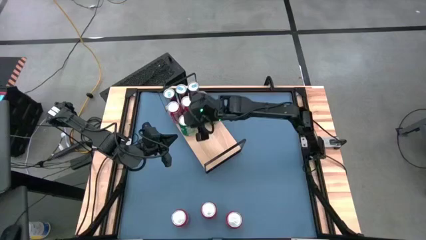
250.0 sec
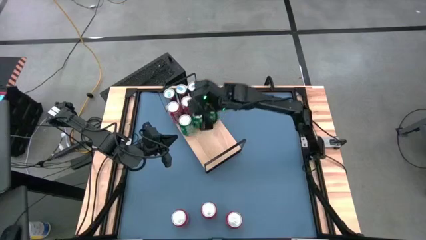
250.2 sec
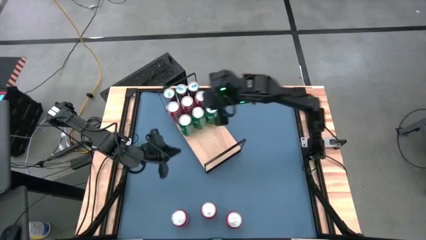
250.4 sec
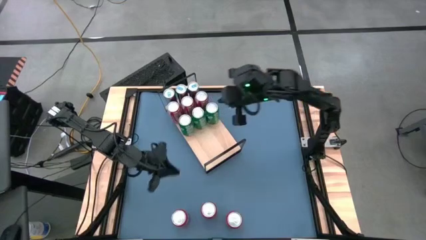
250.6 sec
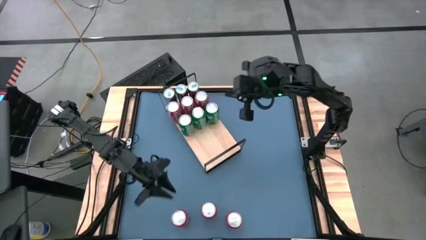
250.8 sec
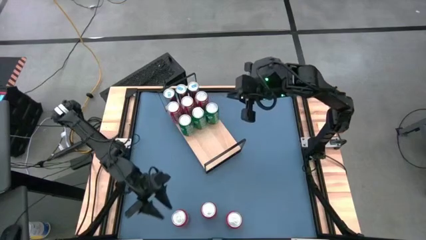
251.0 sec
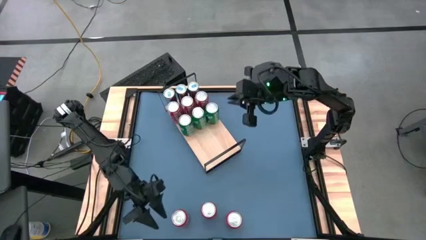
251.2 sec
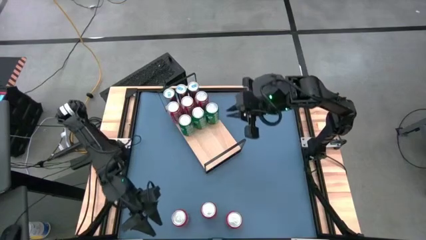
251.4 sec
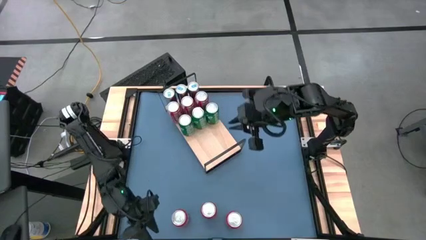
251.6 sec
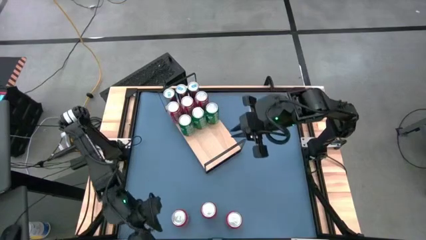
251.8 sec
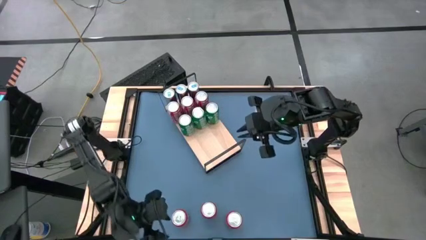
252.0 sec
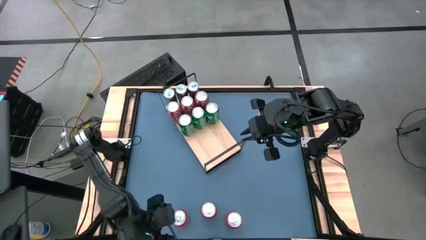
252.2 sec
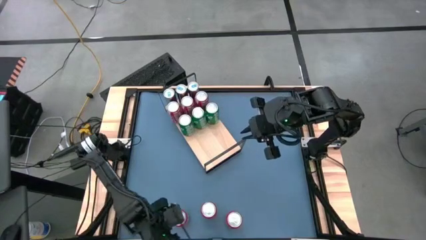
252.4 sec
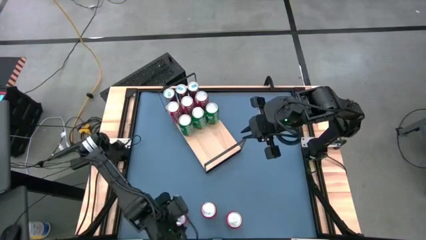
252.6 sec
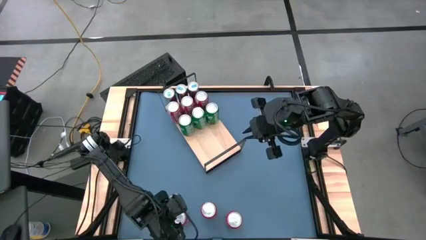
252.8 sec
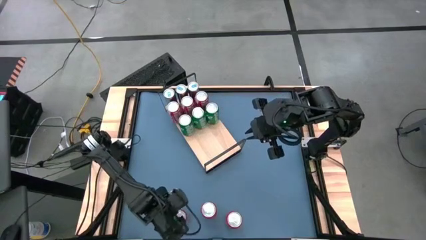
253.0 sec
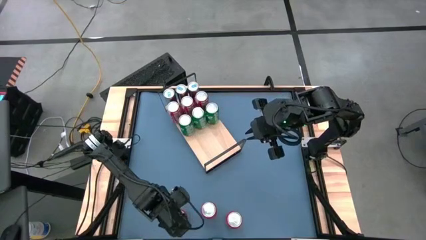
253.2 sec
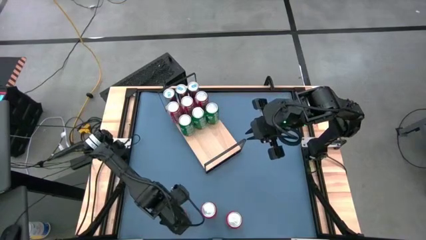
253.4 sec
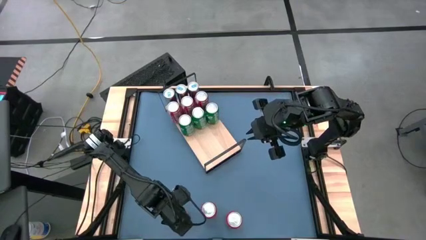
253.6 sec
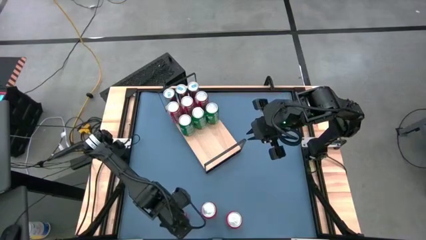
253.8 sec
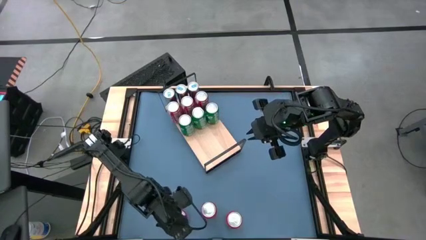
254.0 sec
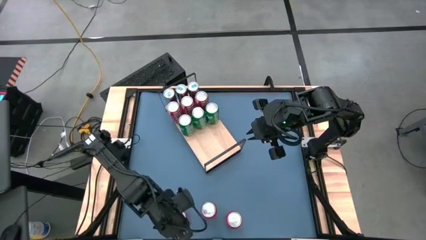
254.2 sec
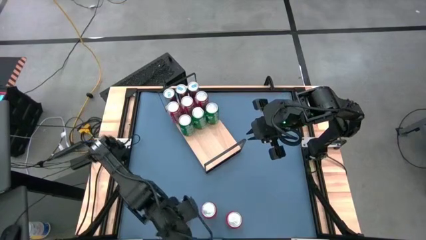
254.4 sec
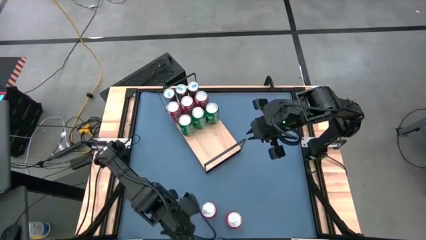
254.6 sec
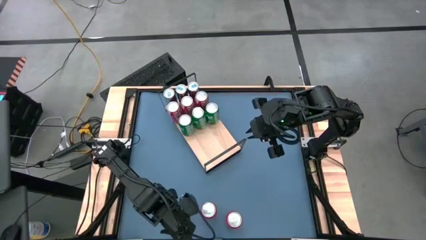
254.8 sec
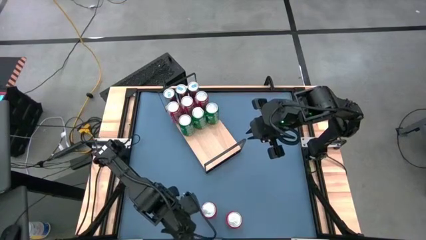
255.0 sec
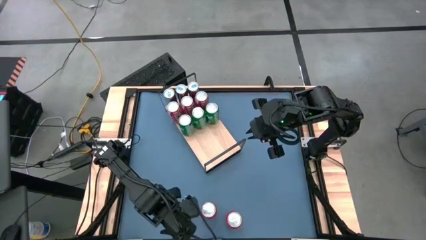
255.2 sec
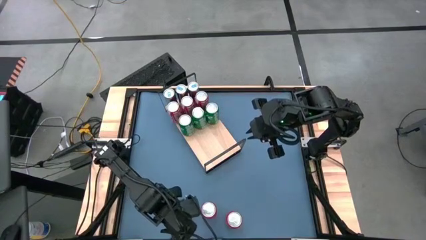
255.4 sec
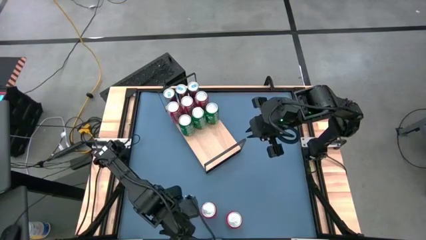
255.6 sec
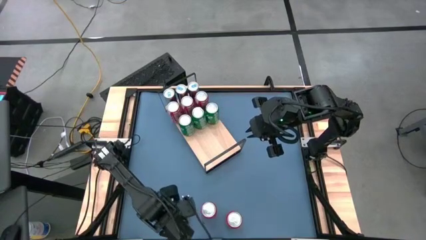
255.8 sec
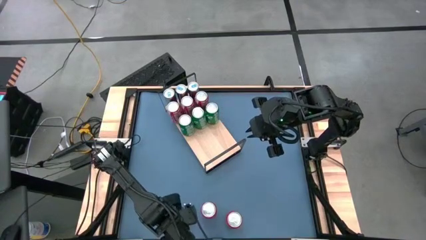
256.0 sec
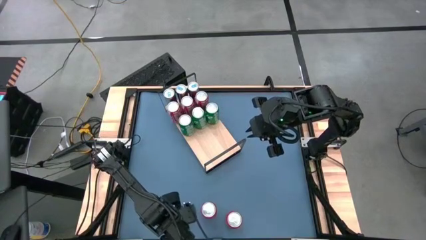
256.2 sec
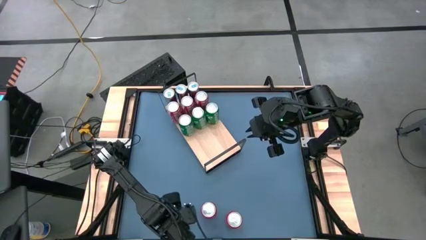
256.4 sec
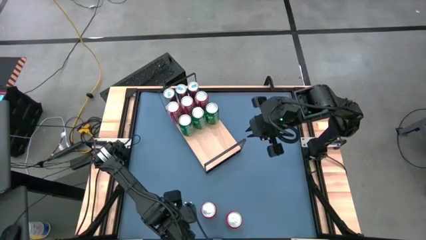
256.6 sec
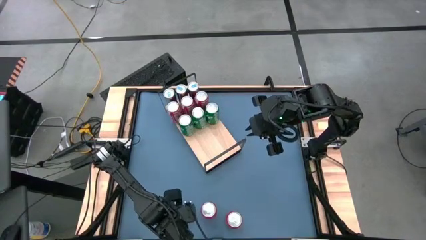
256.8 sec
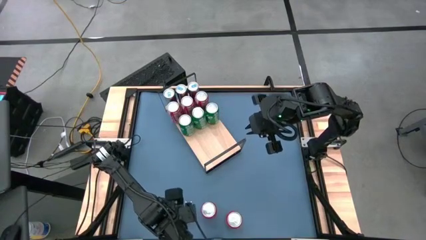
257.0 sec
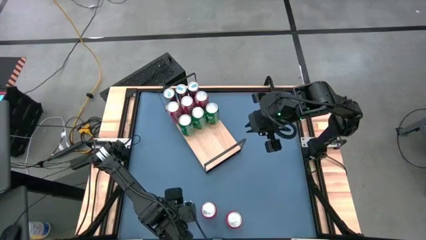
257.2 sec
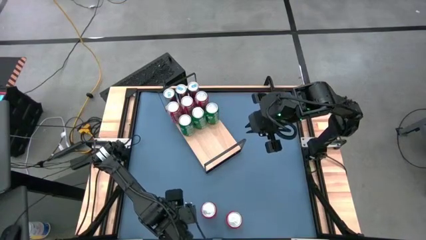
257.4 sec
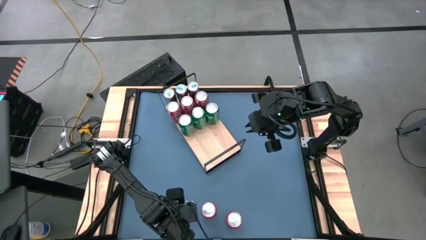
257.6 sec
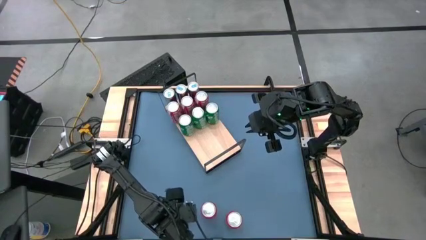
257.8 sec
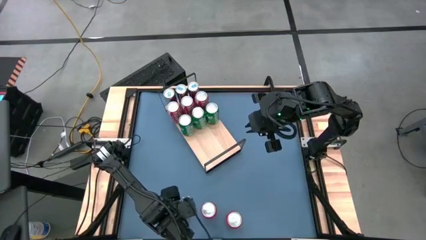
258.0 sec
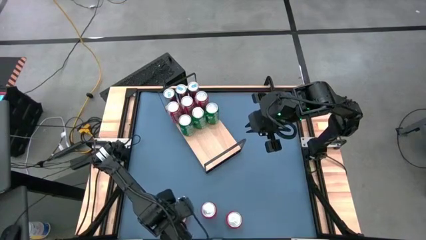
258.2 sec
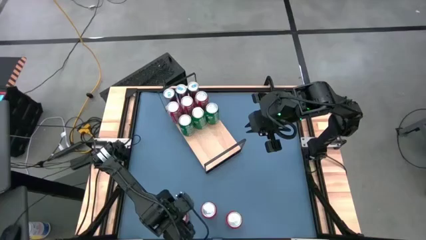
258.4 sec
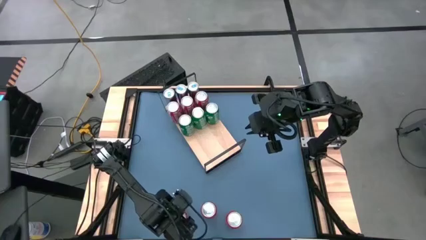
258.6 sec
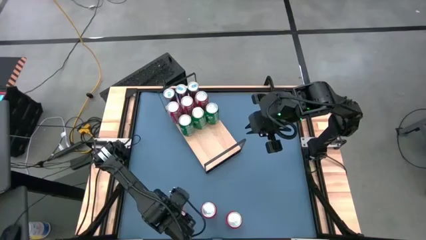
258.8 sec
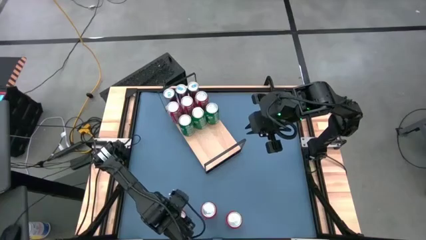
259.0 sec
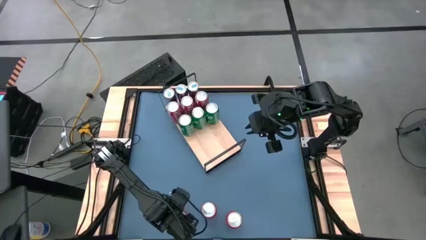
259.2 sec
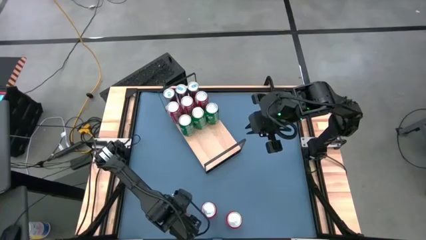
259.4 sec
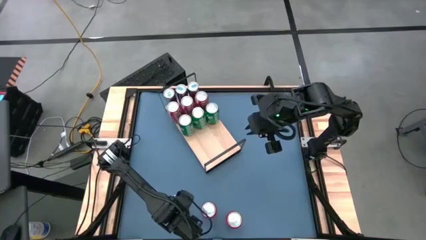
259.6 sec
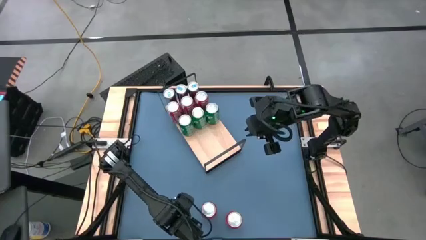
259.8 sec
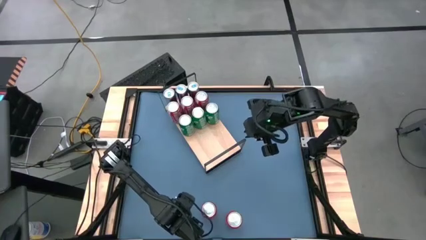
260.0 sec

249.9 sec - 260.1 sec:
Task: Place canned beverage on shelf
Put the left red soda can on the shelf

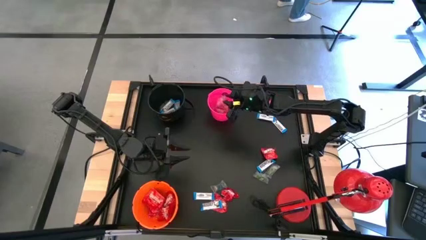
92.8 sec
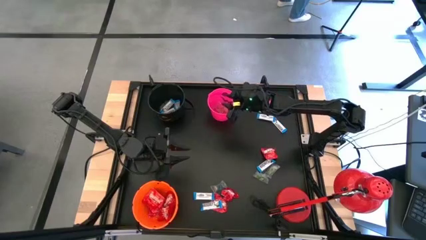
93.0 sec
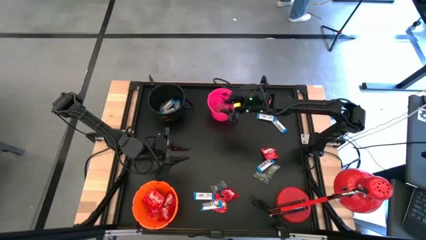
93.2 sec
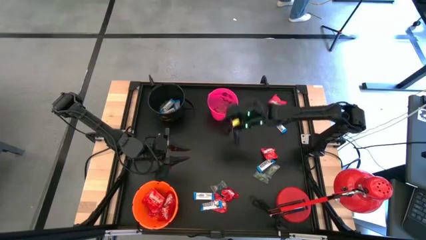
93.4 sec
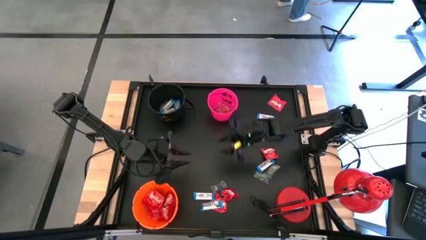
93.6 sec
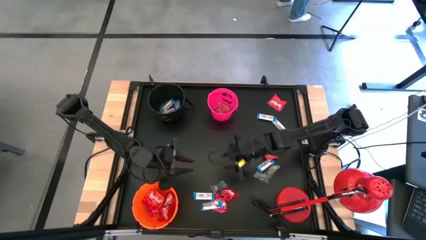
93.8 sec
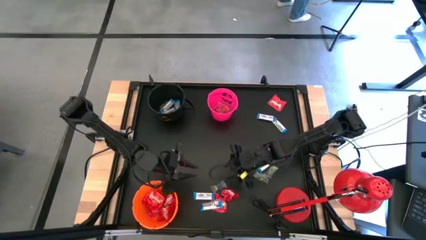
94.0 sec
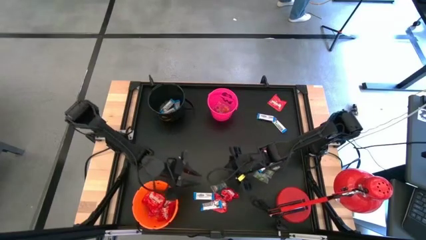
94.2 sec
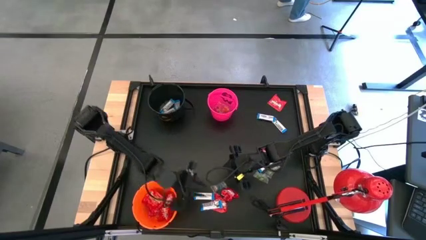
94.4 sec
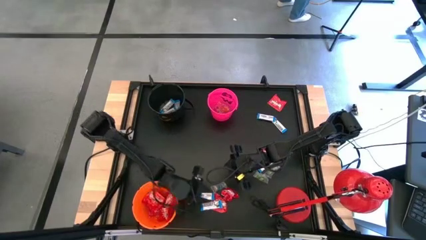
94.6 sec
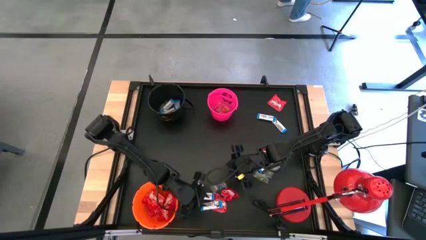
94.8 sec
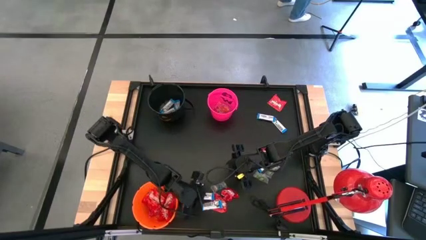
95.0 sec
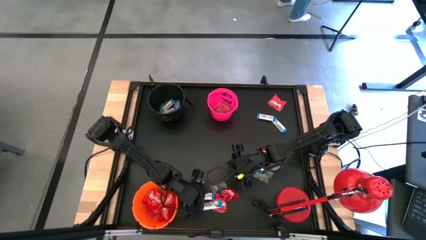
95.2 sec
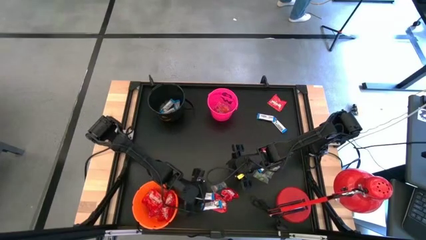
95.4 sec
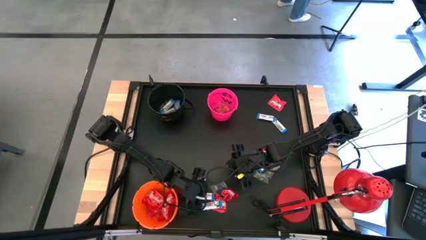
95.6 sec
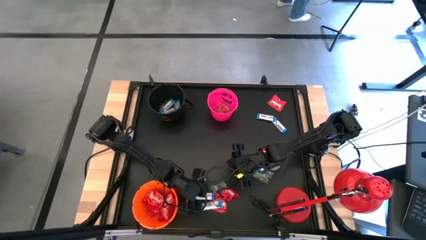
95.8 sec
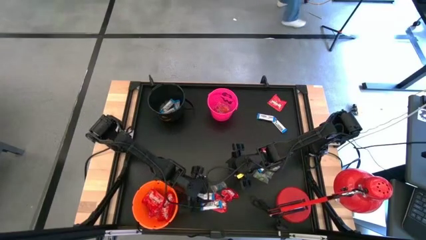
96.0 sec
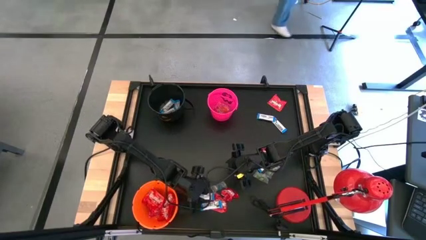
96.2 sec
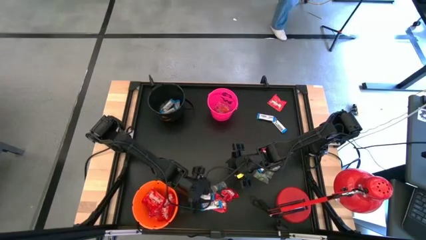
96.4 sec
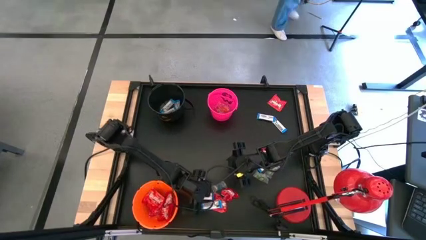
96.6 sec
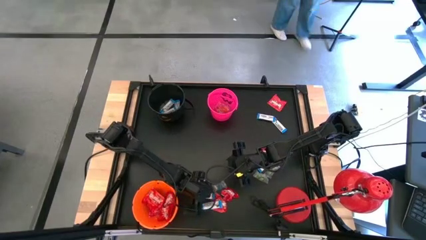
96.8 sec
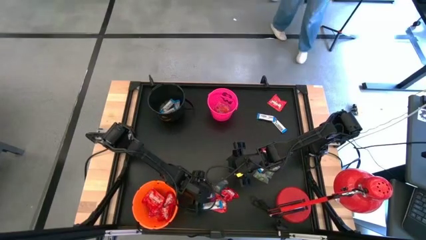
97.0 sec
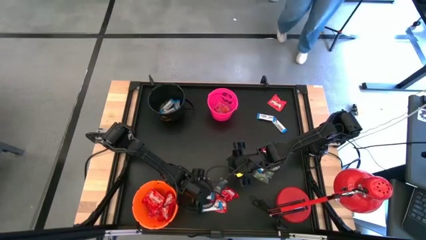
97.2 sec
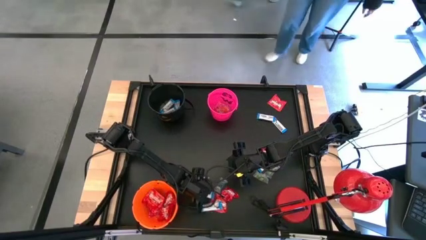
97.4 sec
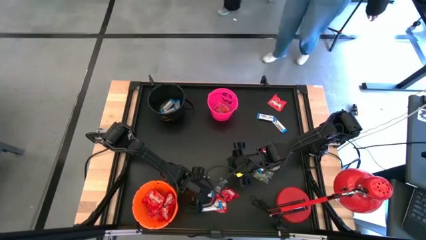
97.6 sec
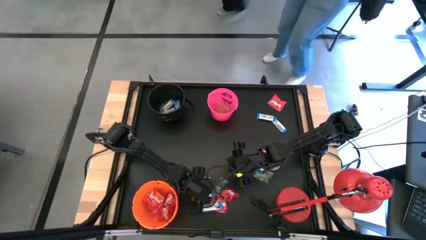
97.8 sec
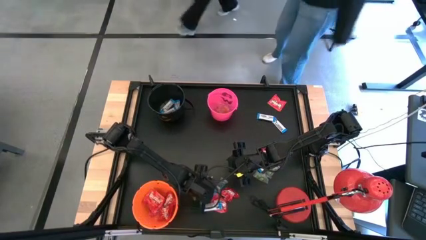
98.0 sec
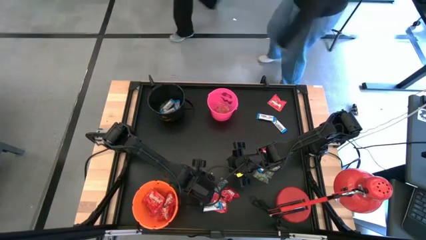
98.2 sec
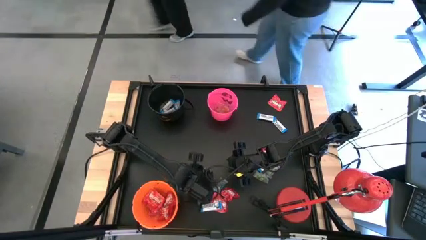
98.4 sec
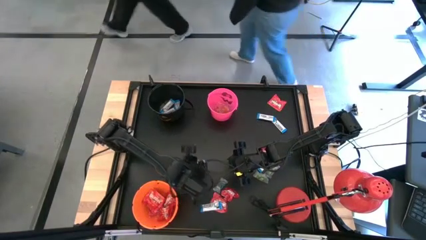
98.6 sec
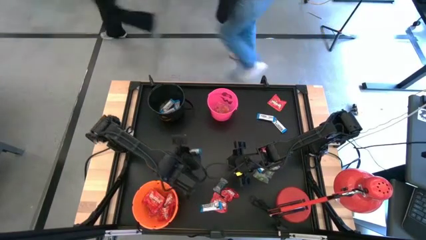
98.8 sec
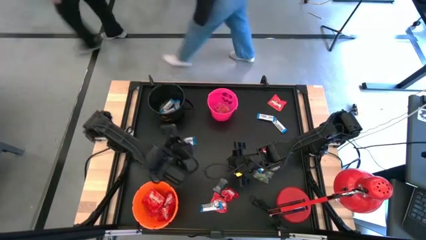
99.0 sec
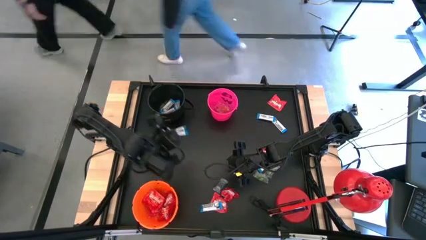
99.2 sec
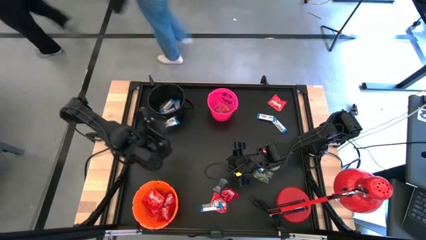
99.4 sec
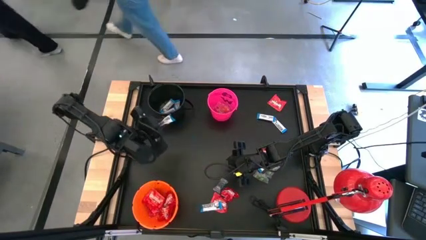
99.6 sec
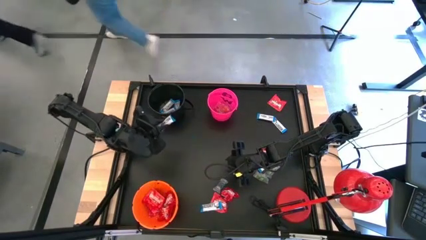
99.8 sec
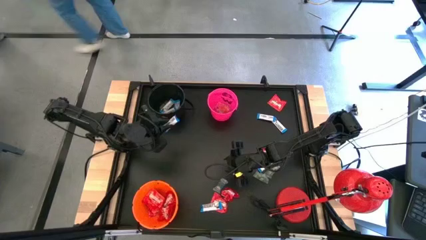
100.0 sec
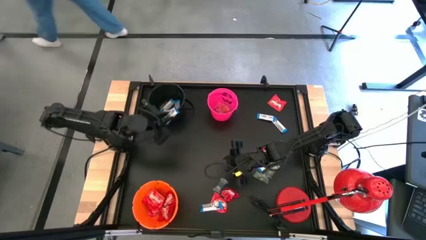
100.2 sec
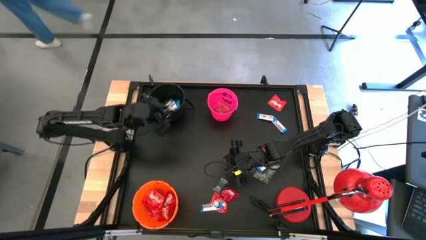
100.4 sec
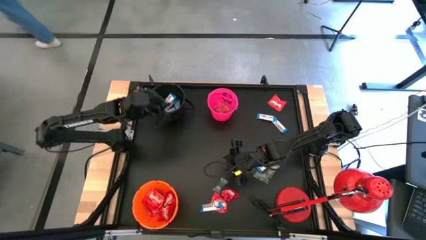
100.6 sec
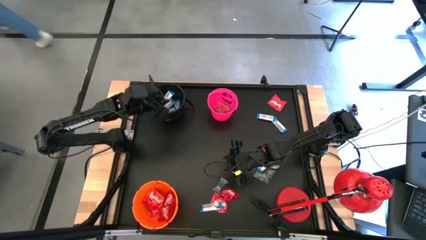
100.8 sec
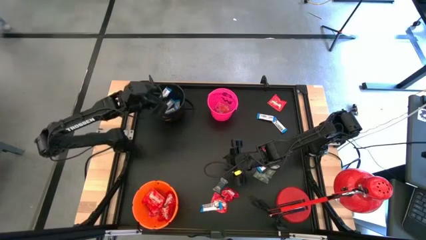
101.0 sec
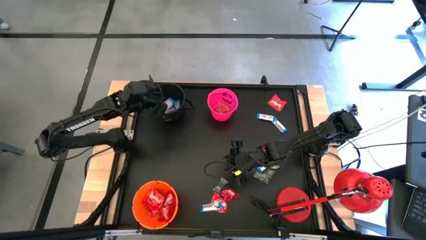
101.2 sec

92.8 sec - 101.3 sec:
Task: Organize candy in baskets
Put the white chocolate bar into the black bucket
